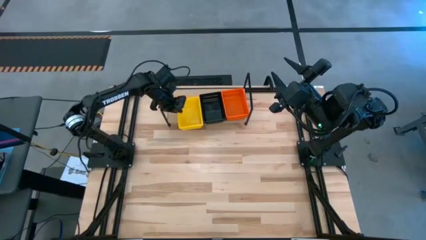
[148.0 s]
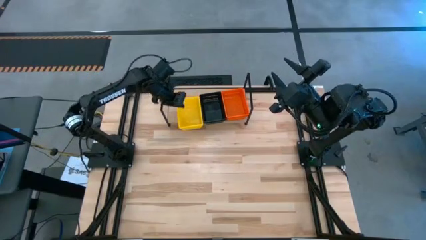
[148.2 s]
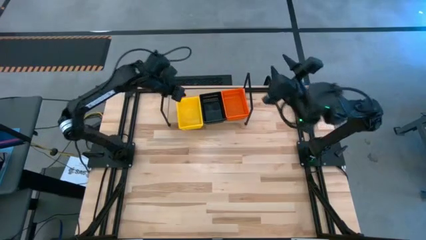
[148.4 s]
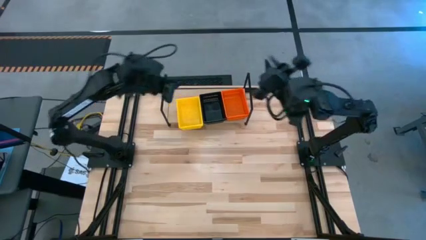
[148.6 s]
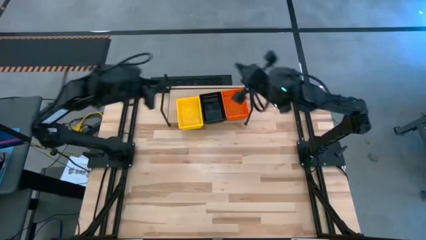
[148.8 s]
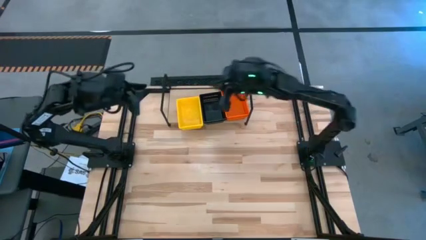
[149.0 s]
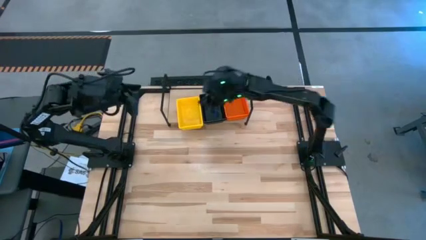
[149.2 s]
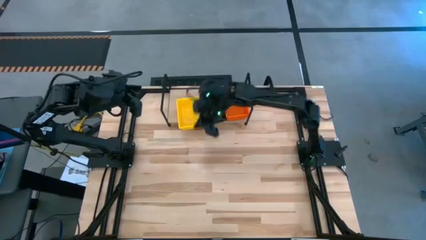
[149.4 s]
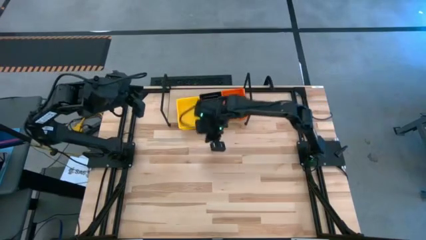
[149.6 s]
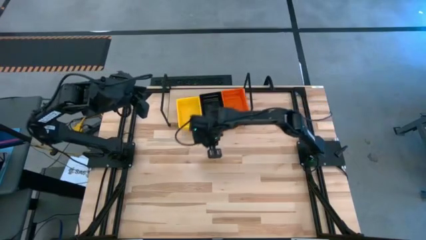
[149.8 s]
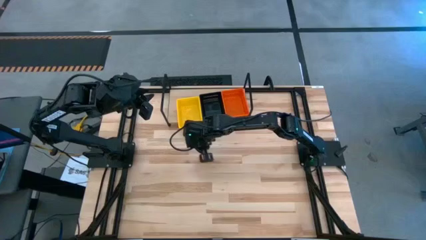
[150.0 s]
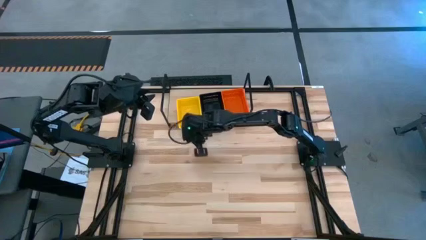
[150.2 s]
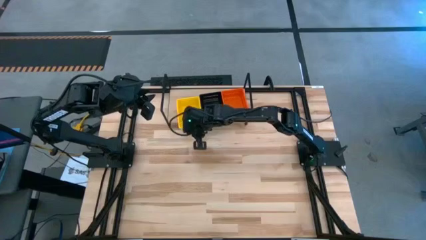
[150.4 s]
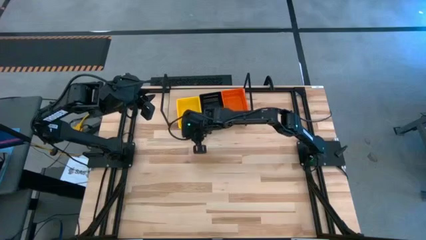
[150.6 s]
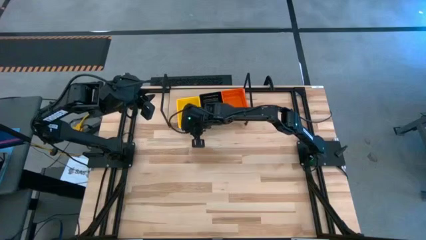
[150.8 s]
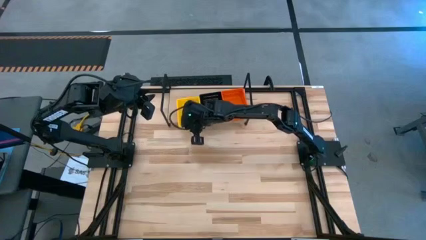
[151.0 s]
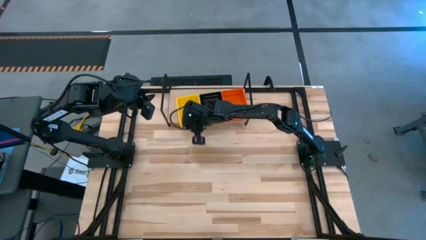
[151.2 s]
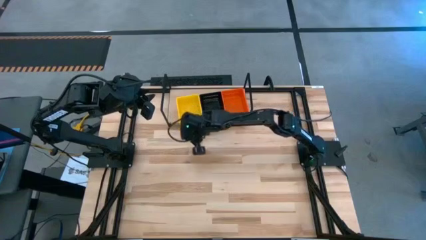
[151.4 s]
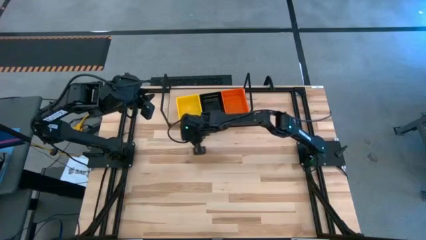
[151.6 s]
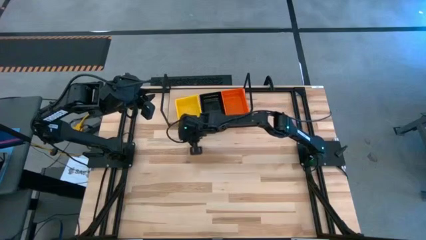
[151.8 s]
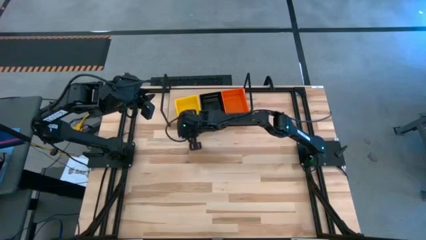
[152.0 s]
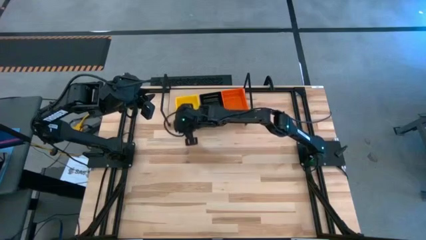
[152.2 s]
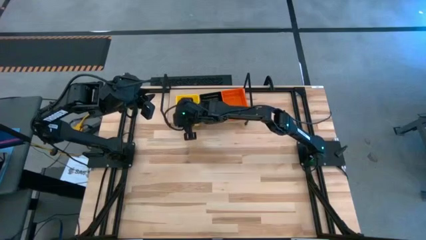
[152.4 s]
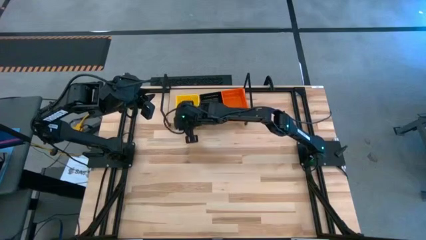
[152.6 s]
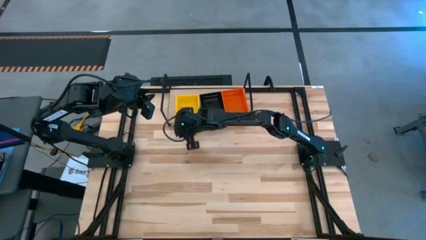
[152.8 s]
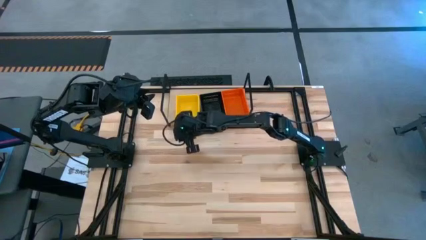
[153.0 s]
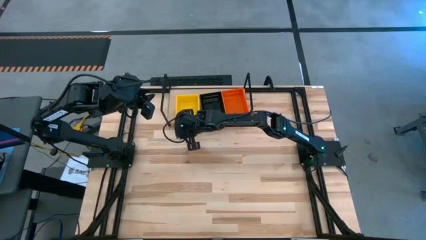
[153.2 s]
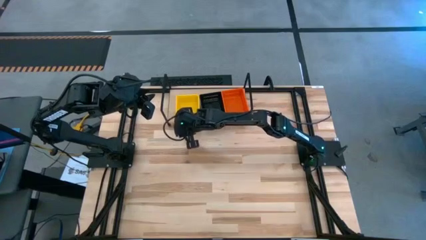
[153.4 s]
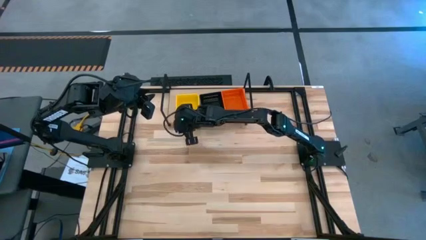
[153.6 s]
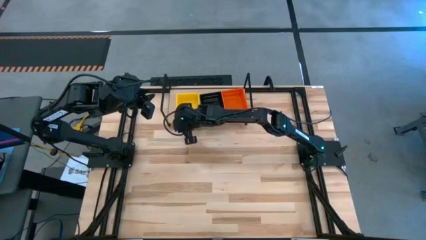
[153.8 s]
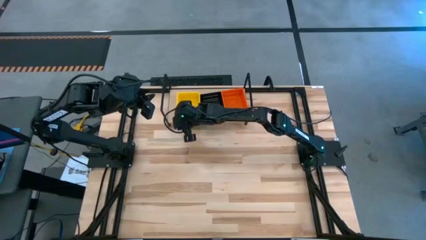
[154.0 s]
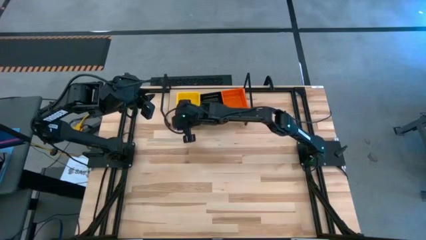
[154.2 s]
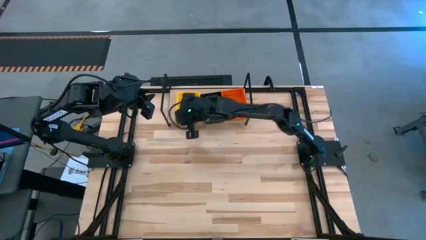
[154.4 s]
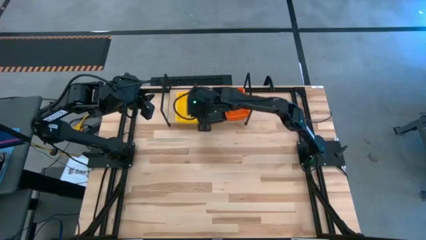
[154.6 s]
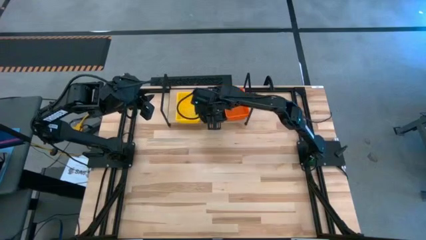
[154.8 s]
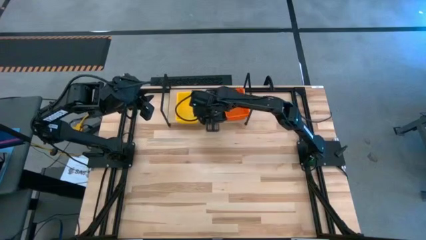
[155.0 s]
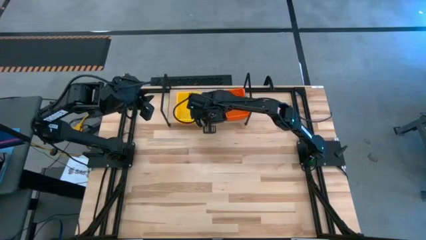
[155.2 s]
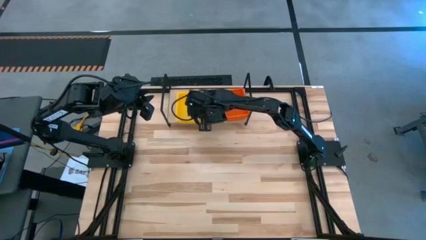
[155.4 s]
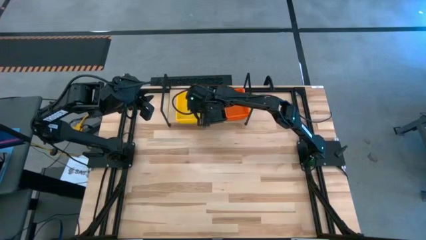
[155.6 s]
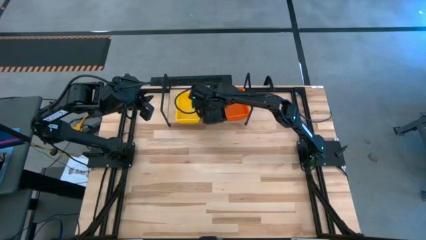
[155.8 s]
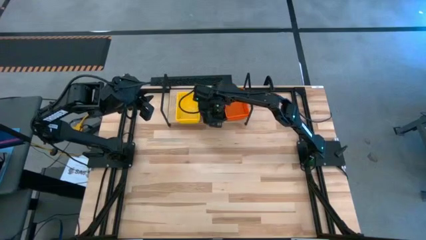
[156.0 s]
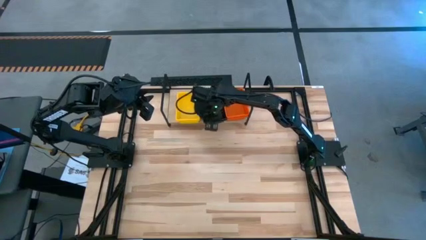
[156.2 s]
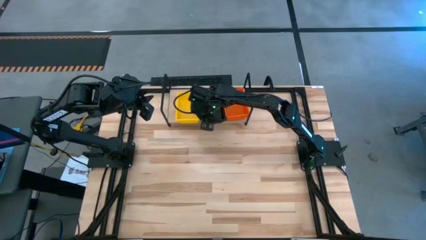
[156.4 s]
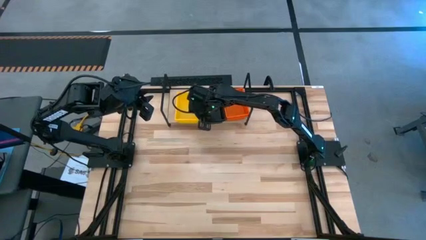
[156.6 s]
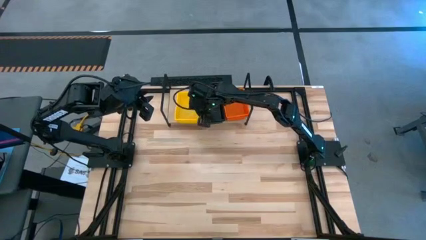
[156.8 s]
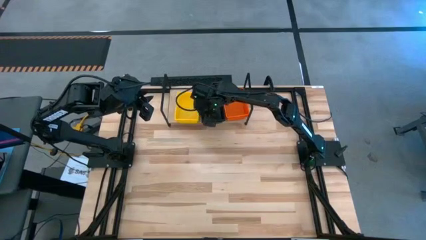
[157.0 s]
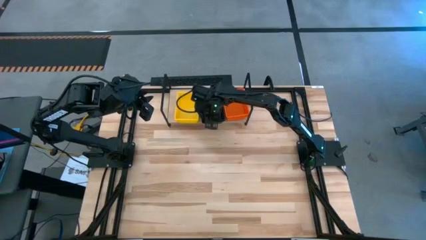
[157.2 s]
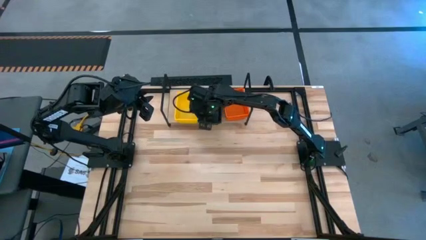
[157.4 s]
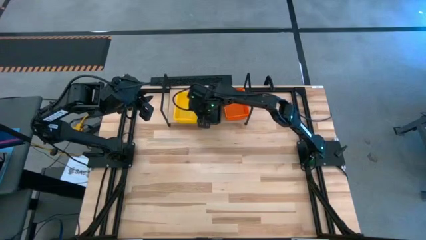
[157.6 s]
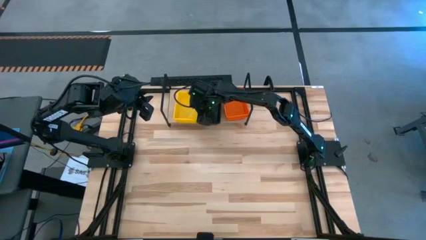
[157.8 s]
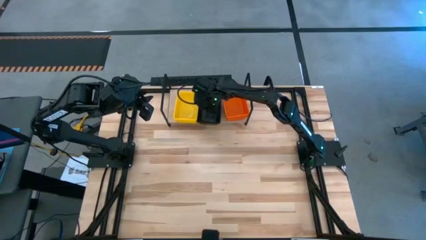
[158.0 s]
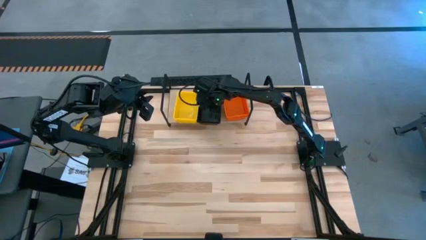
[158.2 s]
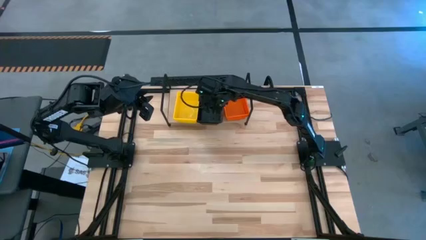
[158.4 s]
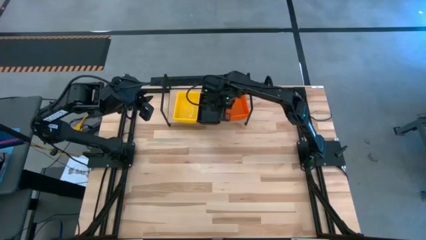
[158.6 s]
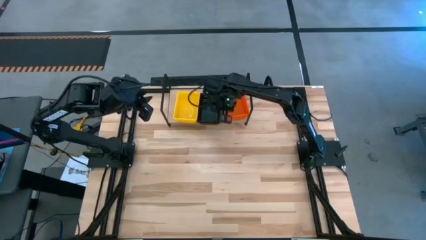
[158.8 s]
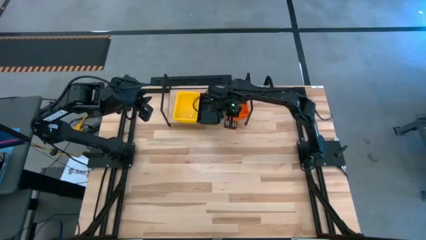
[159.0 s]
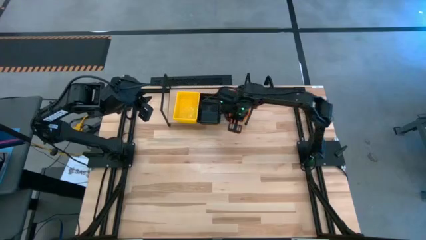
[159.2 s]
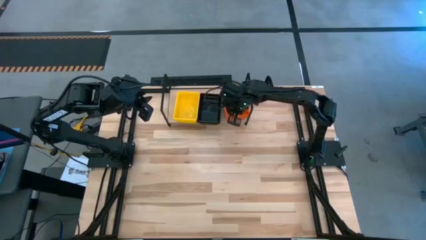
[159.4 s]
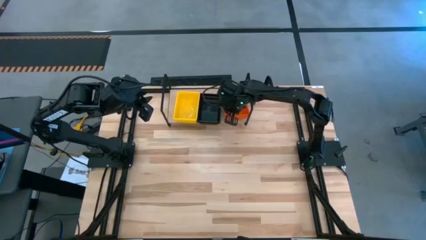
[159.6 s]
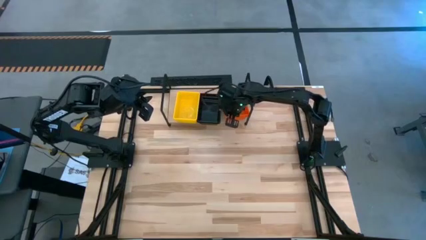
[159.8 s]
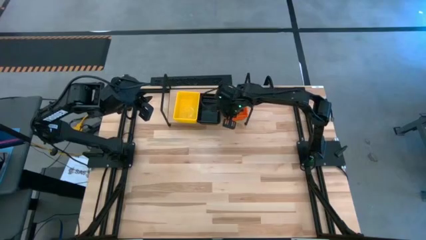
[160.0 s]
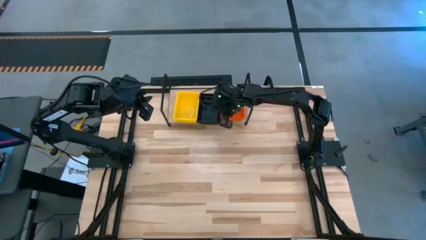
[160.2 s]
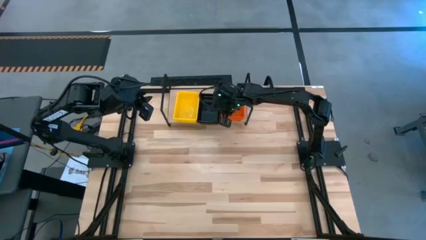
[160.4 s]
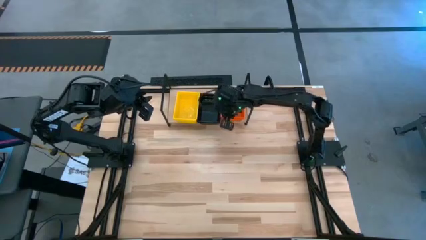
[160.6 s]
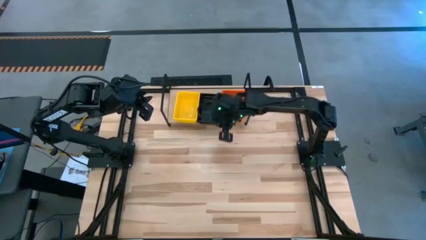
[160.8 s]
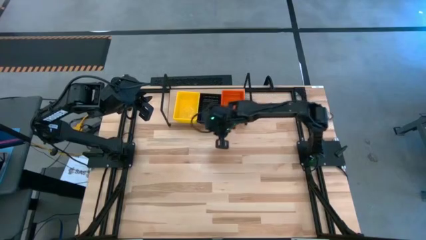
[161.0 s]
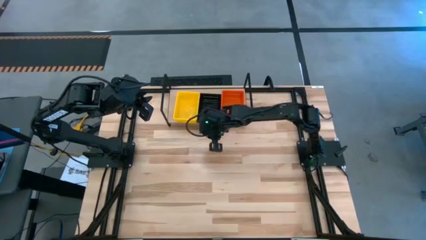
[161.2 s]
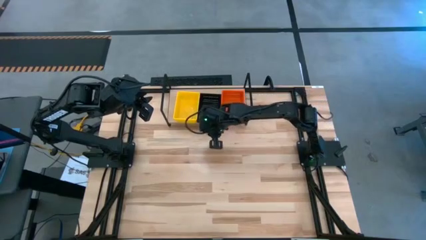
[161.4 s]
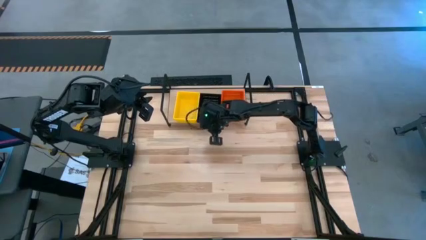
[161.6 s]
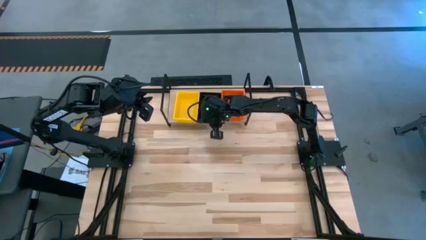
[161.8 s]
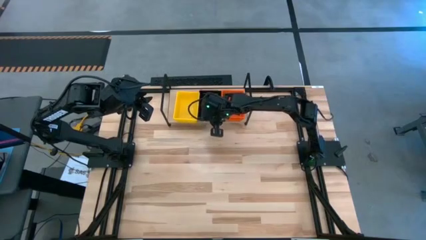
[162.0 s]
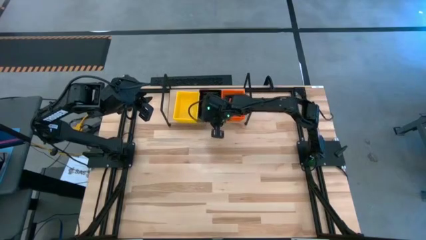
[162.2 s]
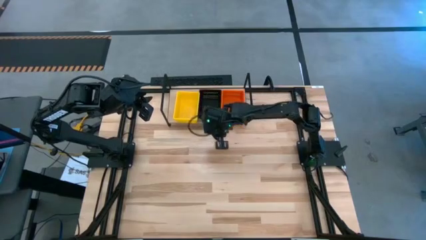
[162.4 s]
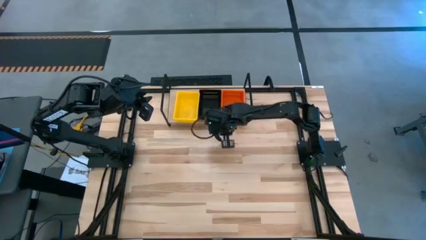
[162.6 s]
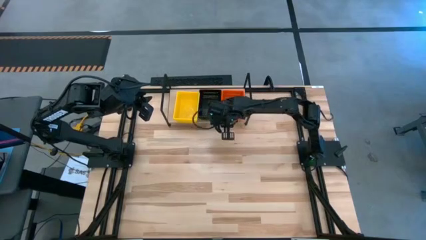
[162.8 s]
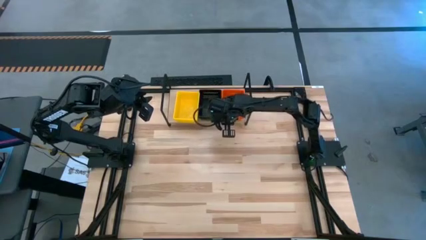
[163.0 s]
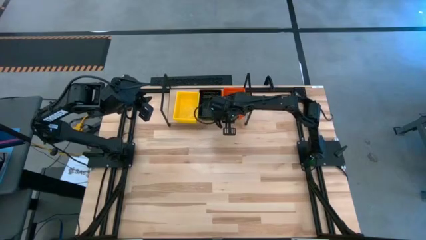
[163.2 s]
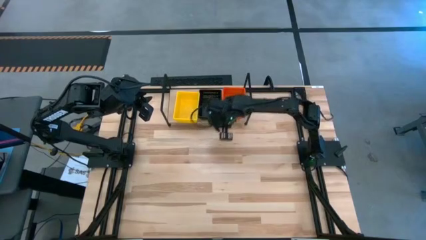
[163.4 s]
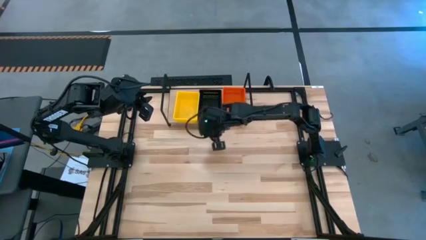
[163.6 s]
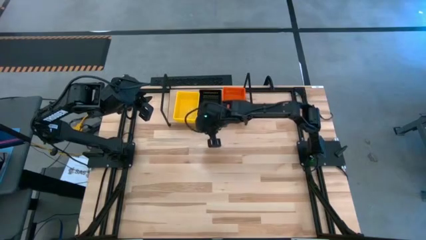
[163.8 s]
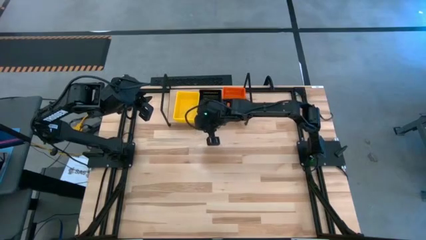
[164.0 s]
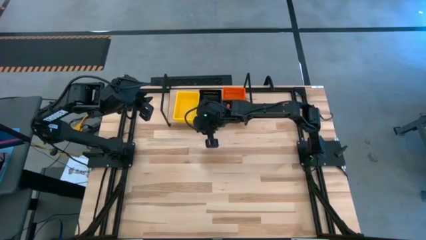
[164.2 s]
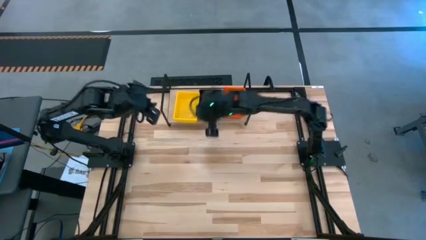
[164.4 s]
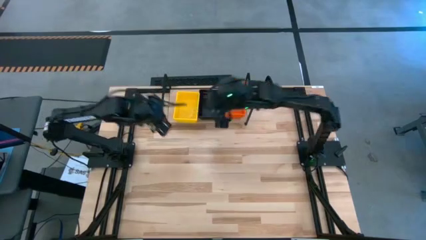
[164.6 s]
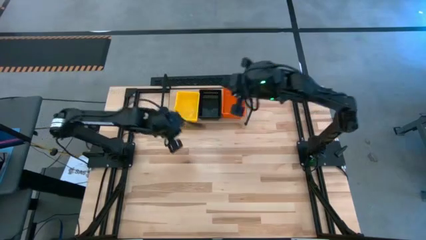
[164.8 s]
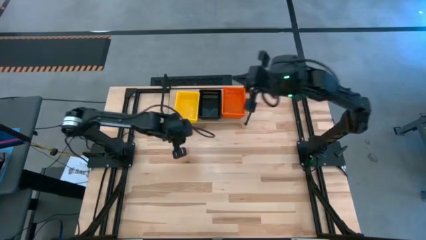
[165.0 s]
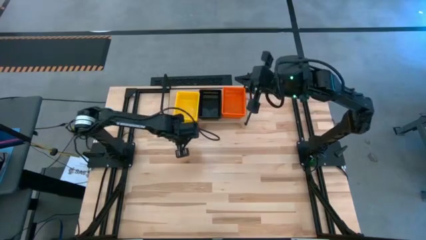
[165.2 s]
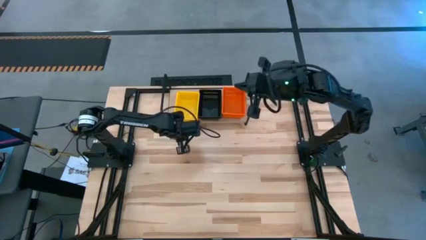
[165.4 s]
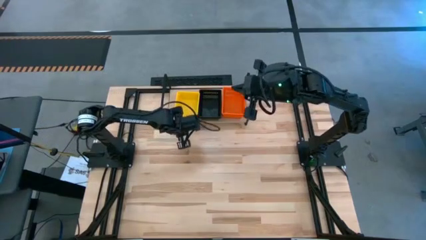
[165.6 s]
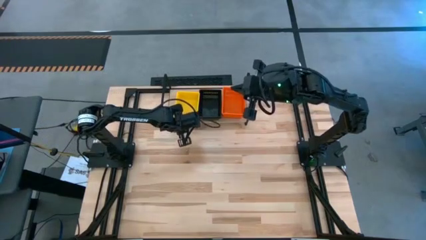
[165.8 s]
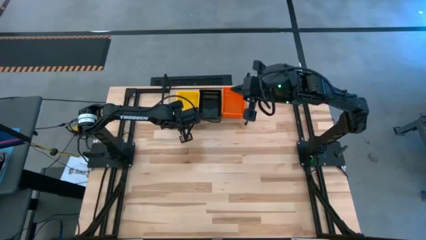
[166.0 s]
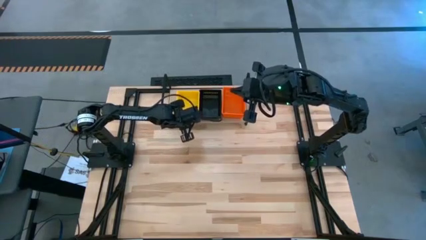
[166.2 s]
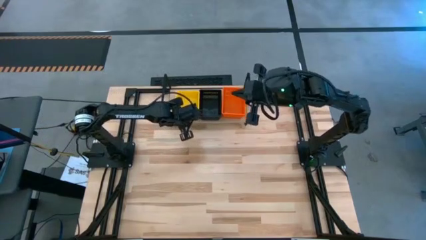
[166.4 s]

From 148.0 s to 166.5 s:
Task: Stack baskets on shelf by color
Adjust the bins on the shelf
